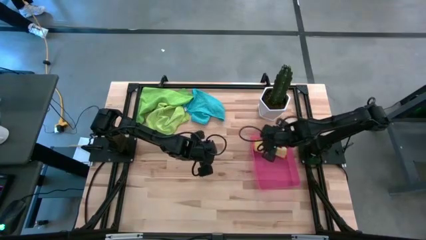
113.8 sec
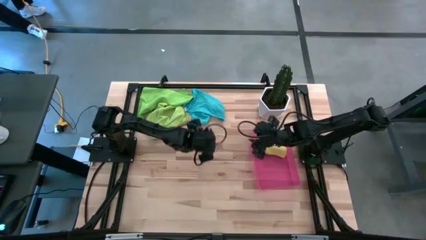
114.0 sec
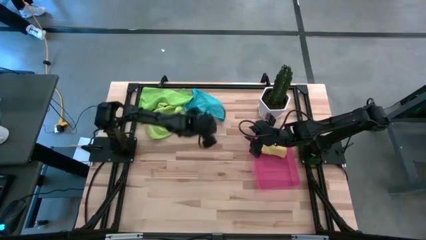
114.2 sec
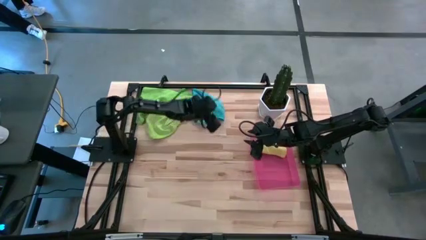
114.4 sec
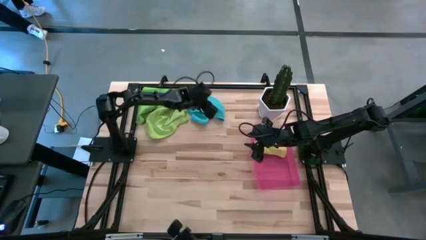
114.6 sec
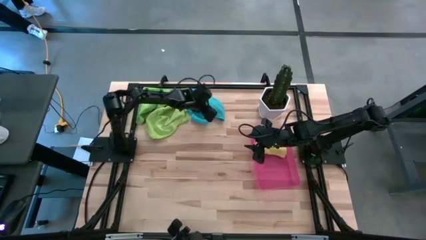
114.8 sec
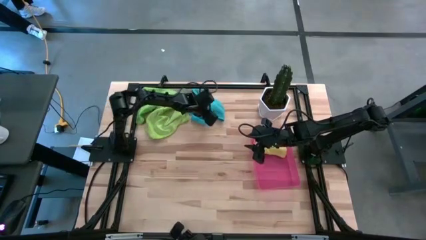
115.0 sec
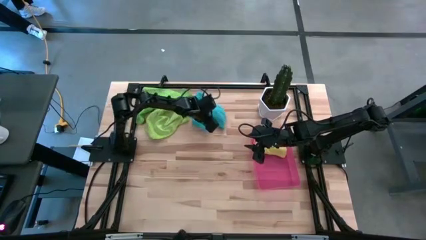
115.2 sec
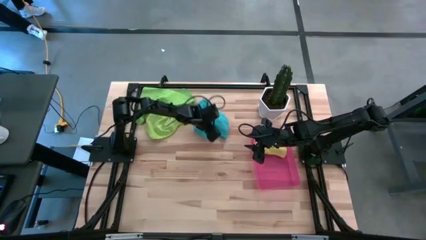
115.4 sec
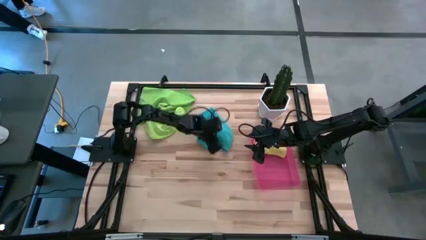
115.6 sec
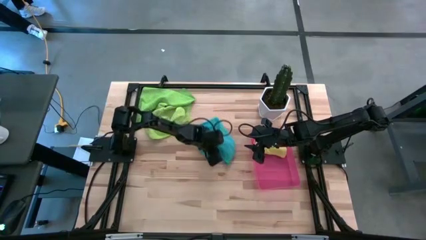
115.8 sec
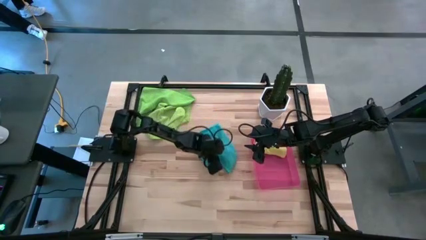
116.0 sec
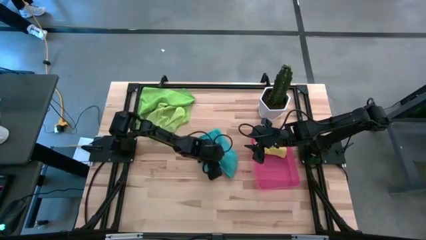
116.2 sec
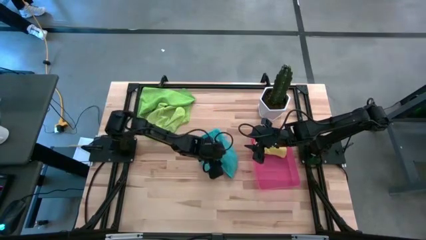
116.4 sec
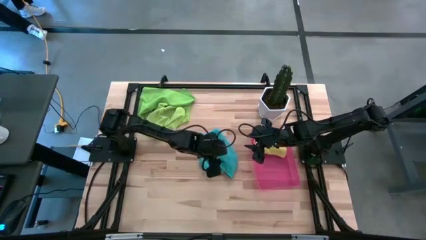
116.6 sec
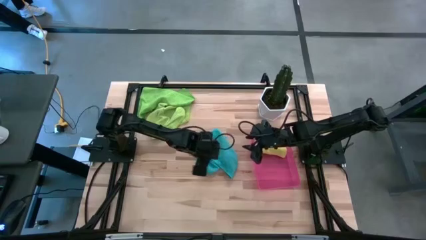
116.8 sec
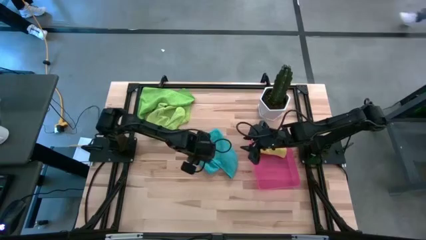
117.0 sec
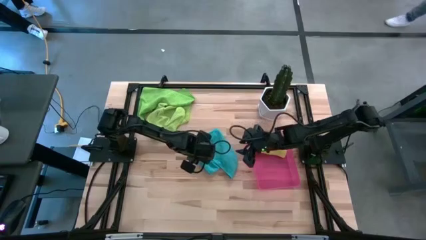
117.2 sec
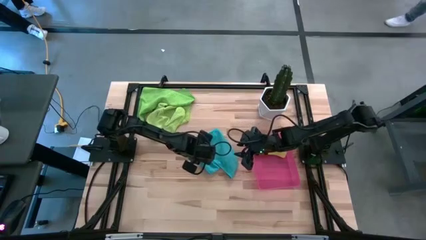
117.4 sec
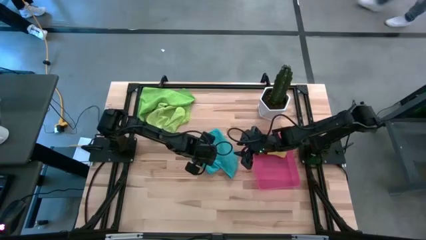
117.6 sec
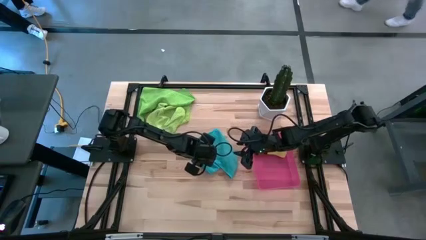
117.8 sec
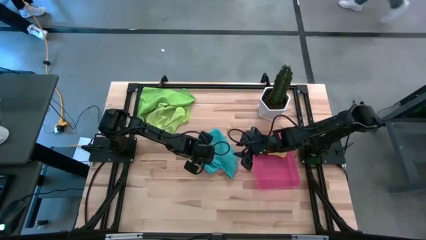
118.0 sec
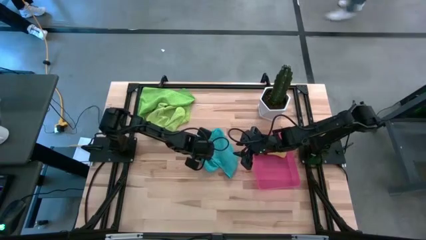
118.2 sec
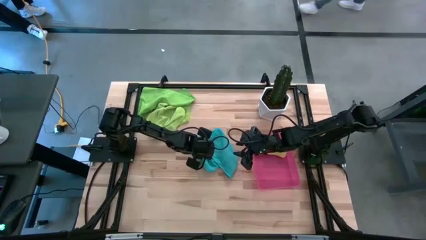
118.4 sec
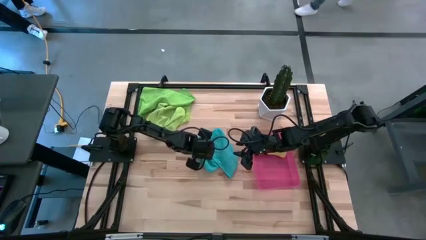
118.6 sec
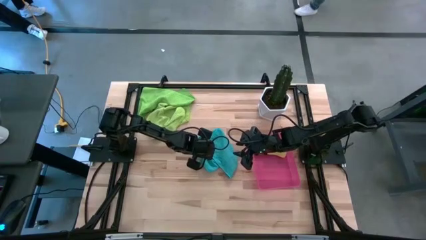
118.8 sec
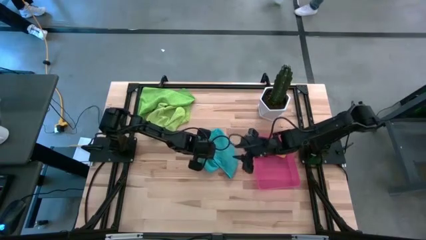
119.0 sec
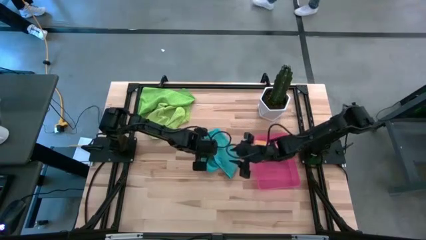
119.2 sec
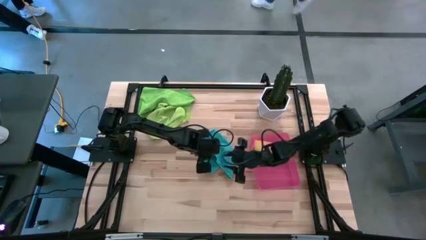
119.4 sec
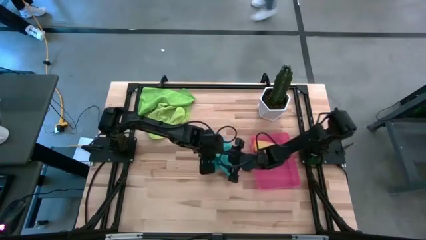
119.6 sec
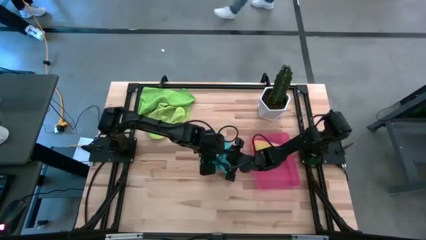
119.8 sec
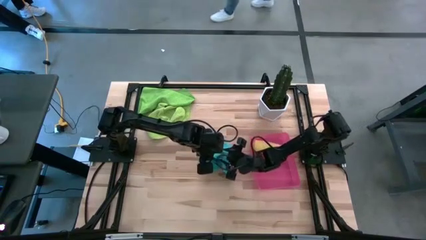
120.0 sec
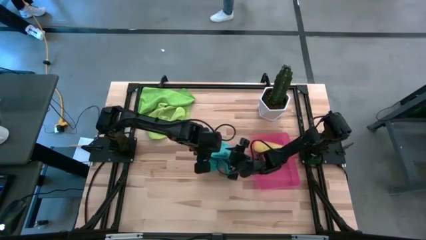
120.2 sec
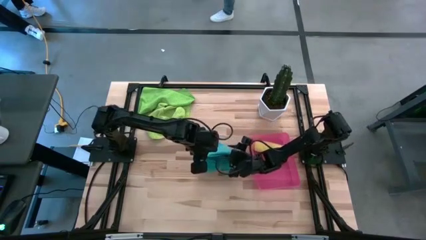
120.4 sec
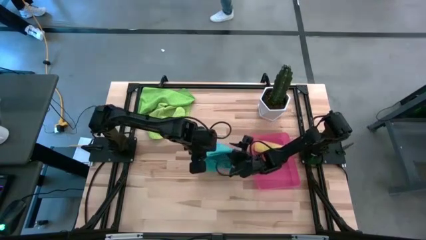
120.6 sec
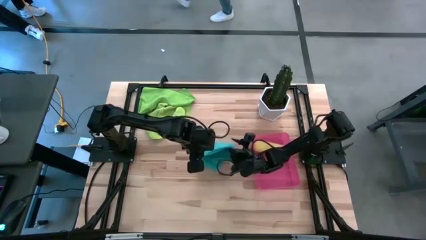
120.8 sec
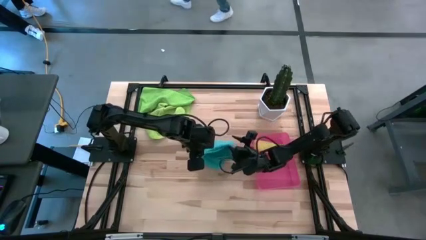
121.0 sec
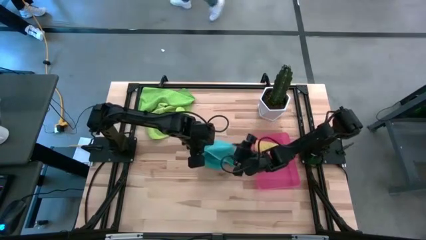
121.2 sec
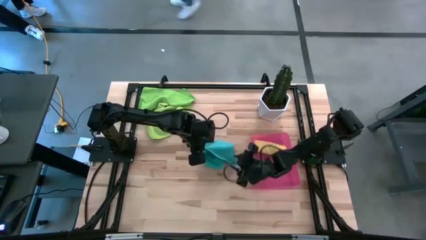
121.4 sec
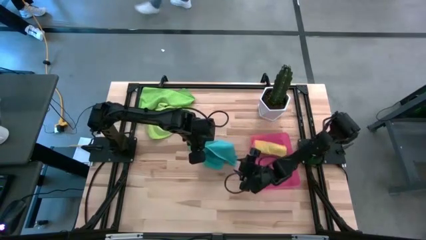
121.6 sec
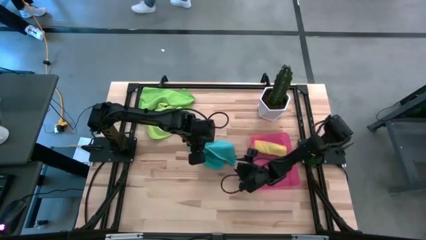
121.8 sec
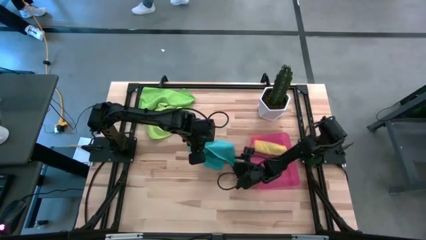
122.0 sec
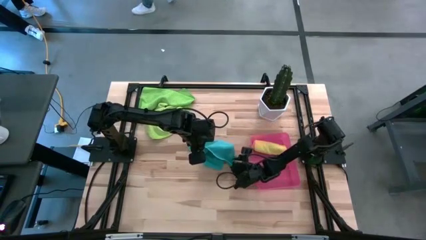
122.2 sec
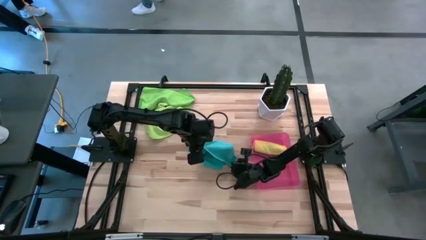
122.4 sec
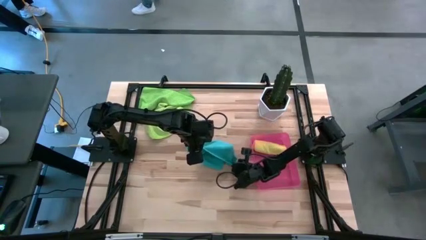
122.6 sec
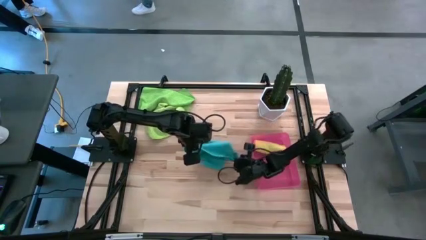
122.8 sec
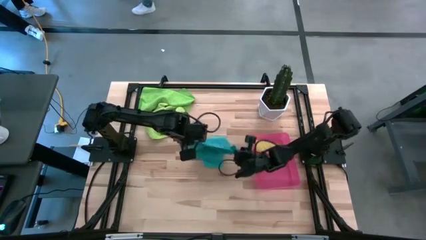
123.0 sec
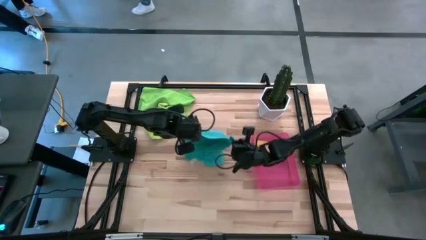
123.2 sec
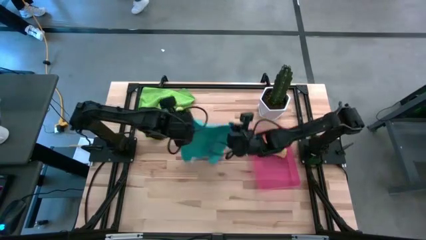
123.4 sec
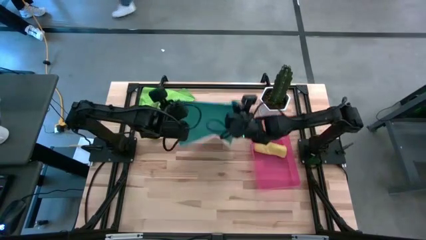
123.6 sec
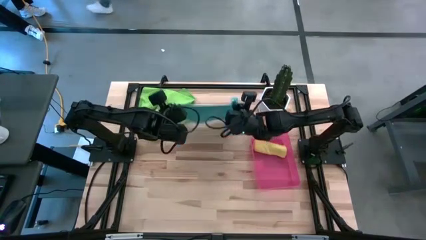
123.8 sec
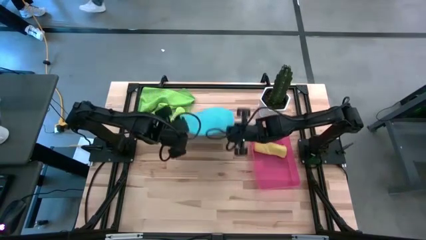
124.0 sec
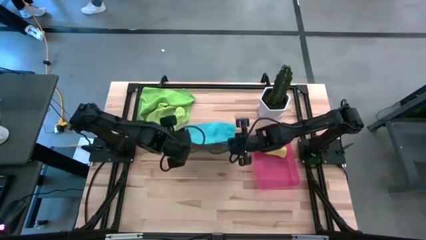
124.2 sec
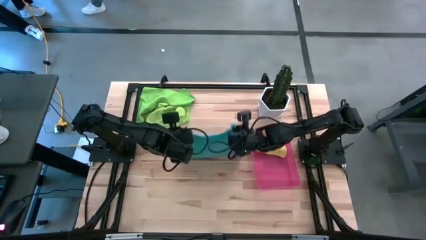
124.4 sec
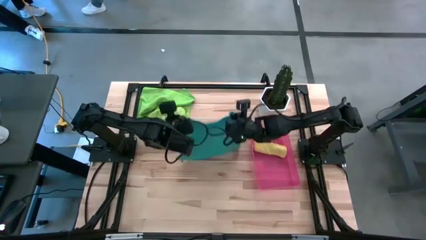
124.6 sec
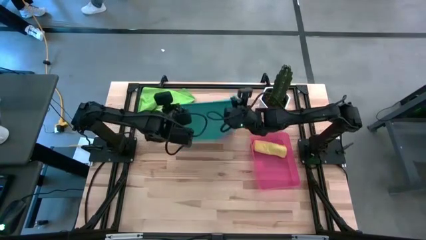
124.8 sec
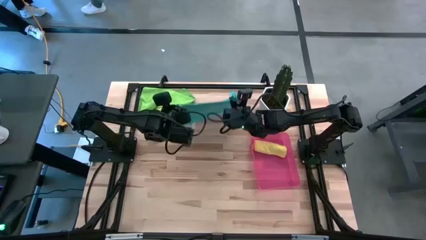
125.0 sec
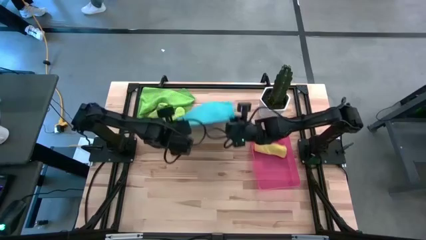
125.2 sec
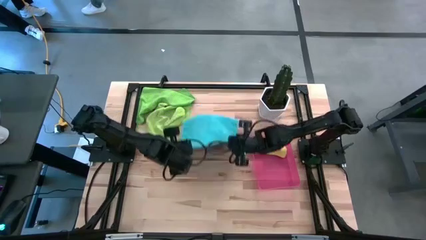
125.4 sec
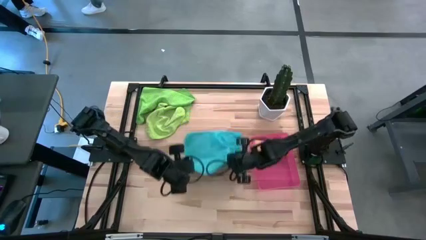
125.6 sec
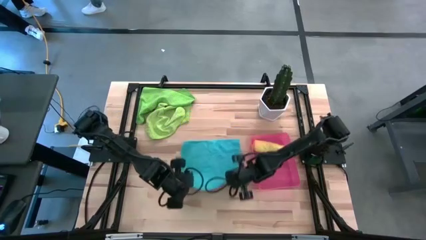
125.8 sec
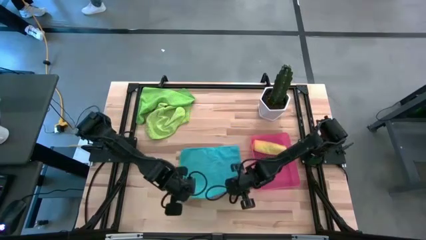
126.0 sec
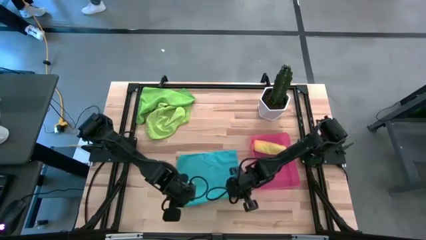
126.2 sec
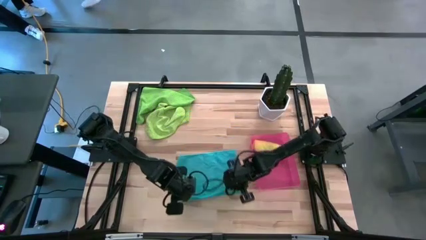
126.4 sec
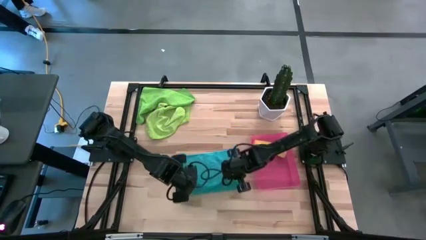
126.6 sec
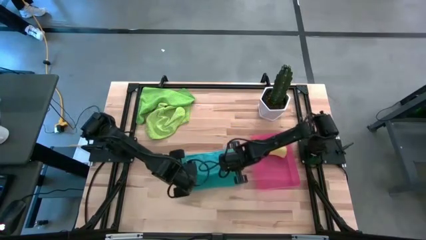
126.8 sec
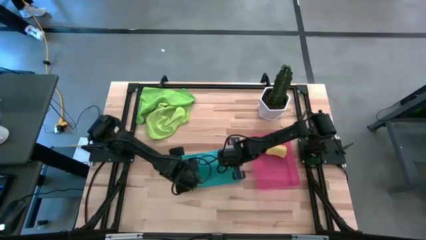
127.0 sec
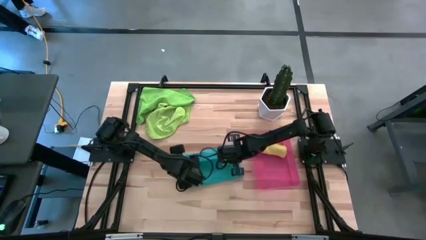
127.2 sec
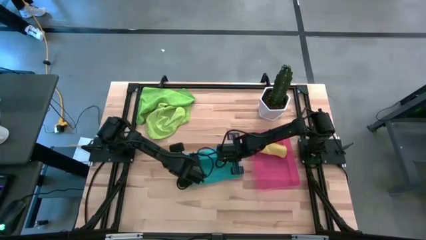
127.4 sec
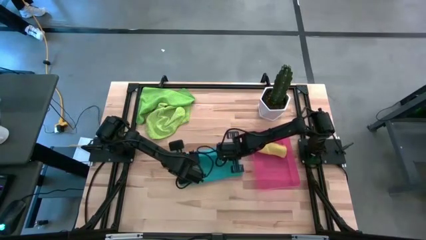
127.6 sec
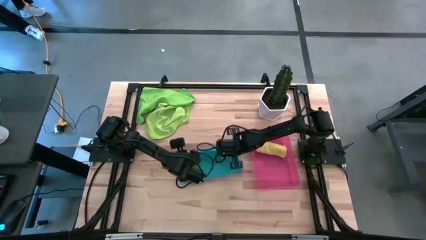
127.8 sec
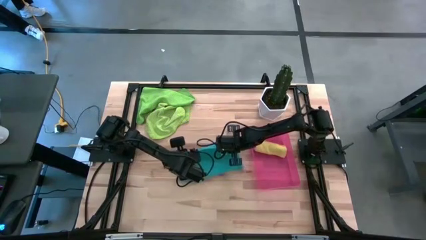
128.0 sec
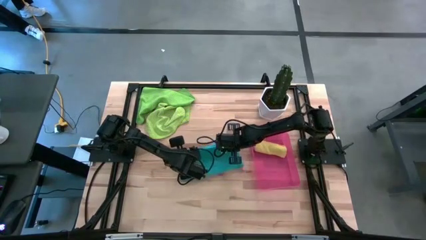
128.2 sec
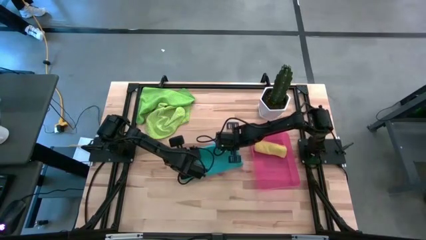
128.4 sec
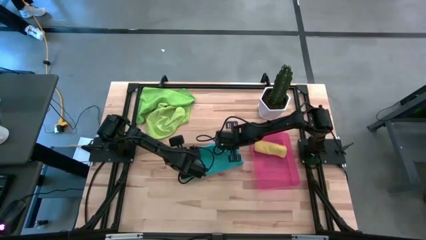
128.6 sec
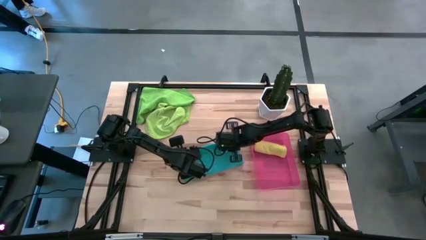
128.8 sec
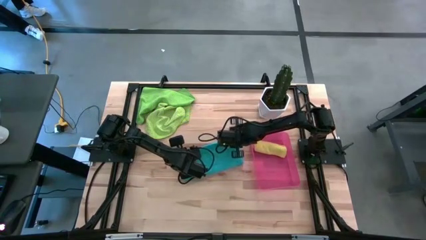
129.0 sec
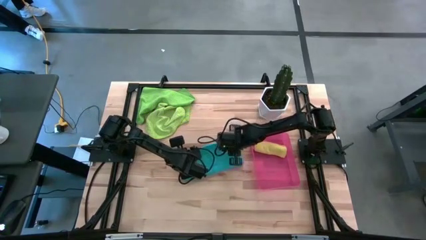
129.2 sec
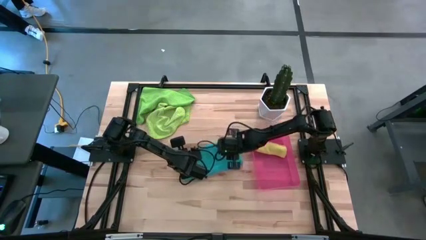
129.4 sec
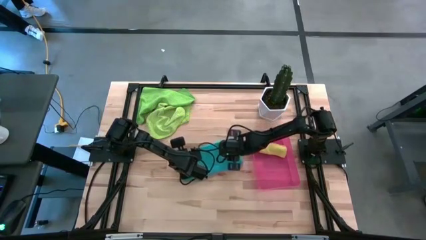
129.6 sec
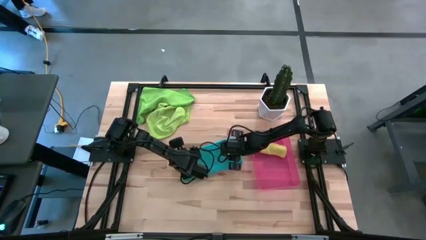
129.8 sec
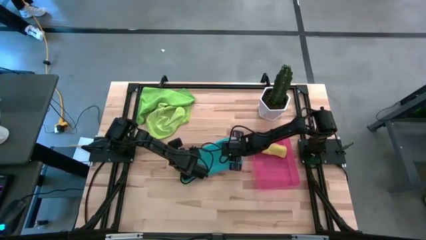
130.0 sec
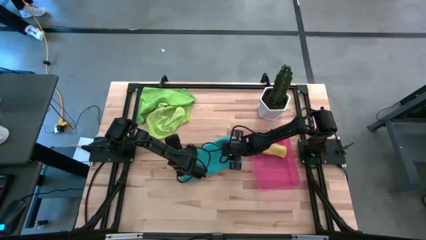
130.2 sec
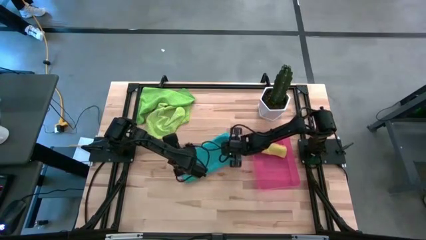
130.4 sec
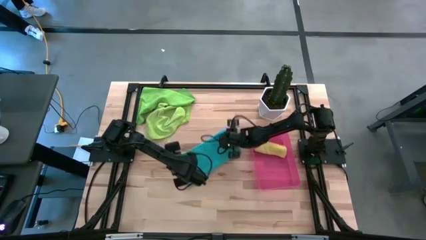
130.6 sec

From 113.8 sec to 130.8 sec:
Task: Roll microfiber towels into tight, uniform cylinder then place into a basket
Fold the blue microfiber towel
